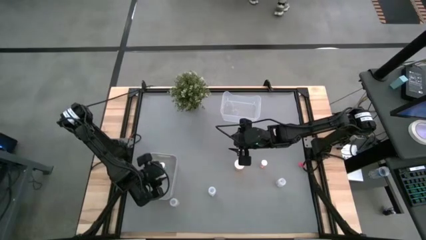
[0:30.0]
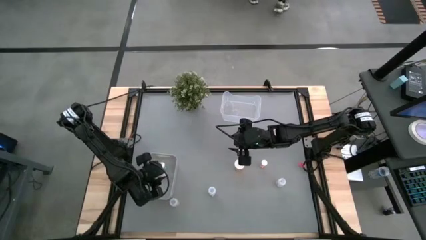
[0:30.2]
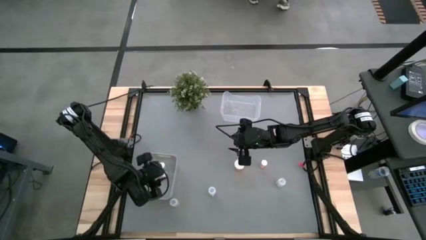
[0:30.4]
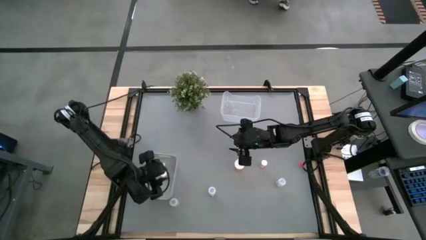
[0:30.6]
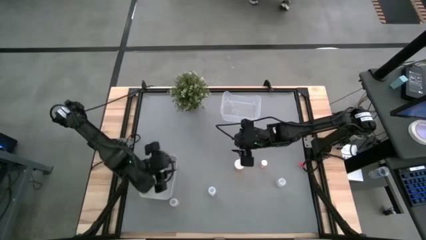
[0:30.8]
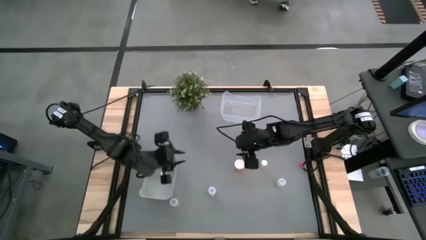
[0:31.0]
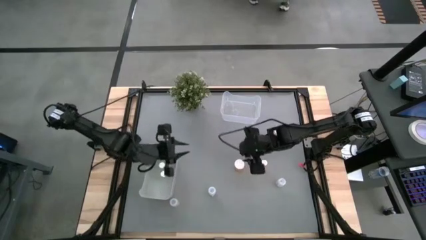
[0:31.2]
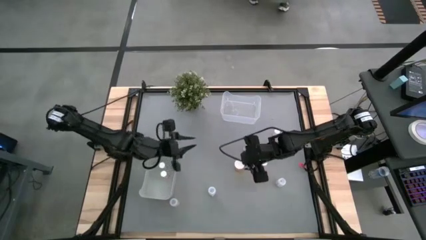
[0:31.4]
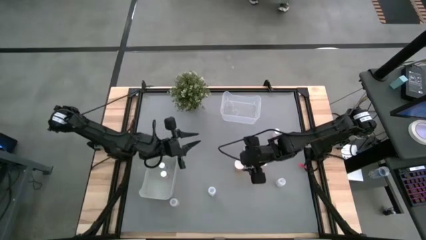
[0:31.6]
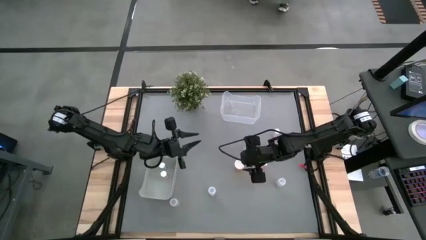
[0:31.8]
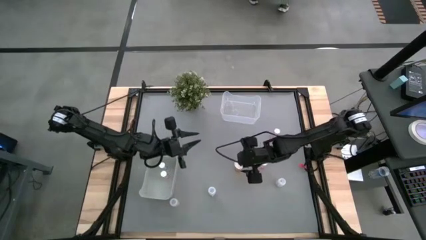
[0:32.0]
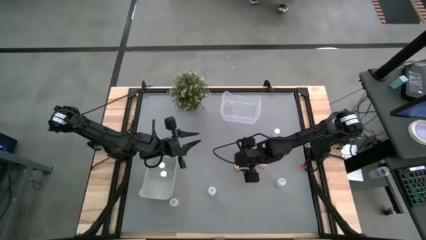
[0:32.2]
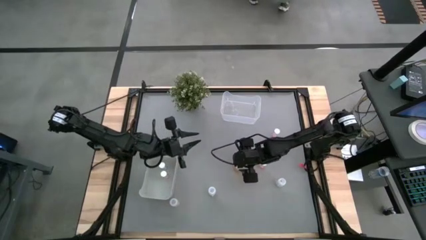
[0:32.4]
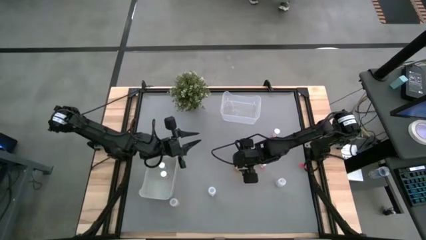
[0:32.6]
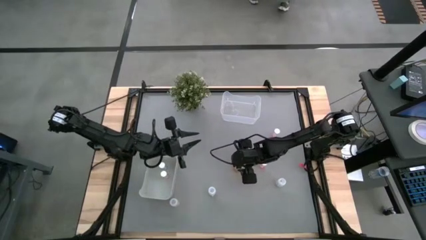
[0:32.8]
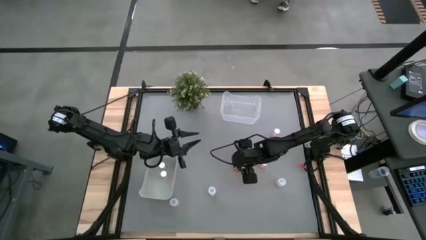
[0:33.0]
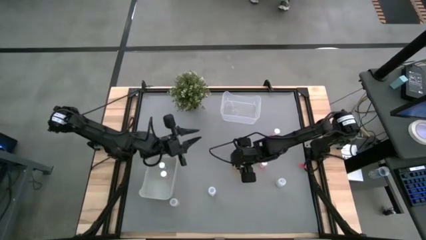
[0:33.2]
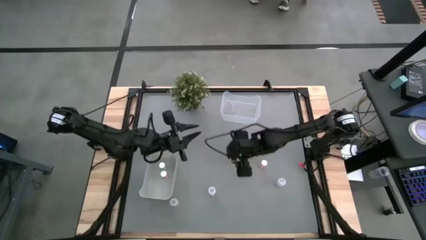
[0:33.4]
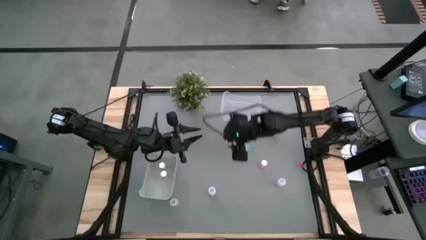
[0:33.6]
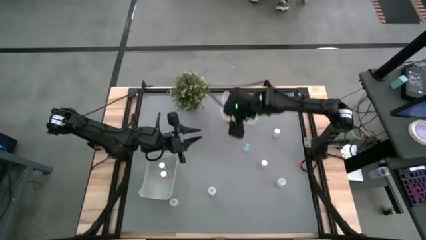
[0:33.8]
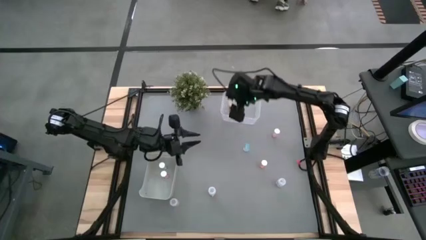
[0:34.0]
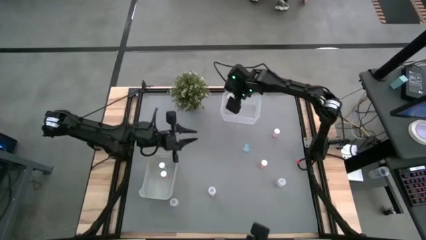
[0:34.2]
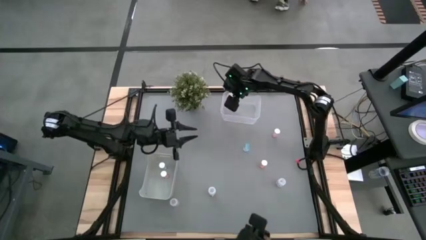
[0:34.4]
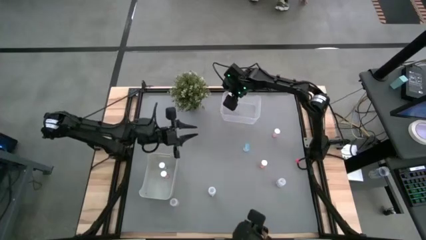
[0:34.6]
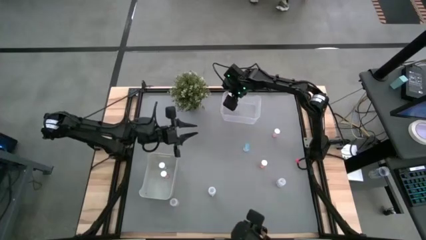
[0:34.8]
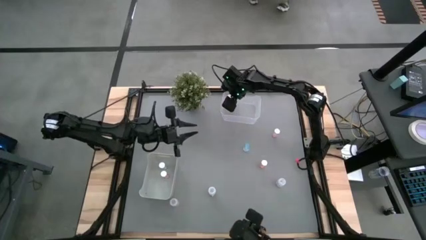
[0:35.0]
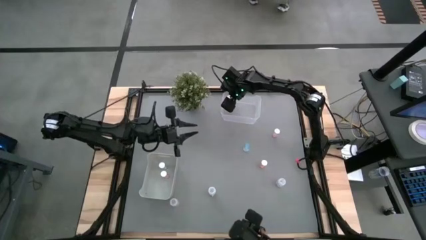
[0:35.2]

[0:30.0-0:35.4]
Task: Pick and place medicine bottles into bin by pill shape (circle, oval)
Put the orange capsule bottle into the transparent bin

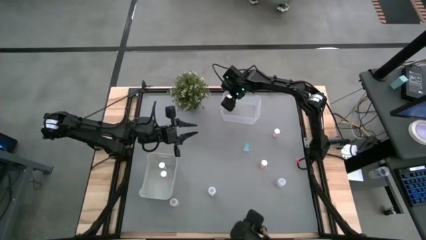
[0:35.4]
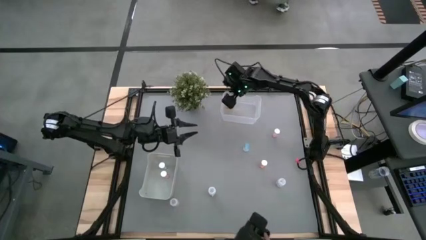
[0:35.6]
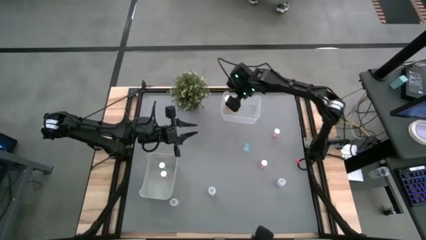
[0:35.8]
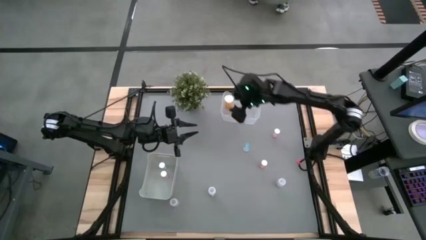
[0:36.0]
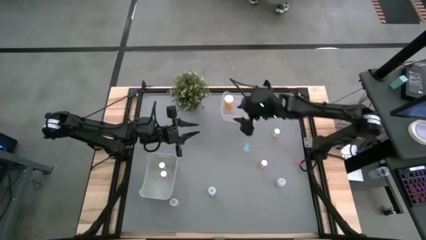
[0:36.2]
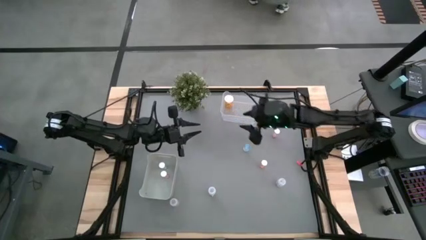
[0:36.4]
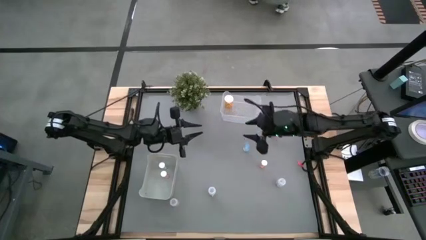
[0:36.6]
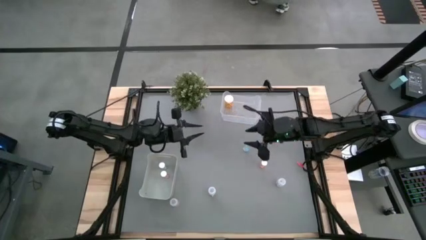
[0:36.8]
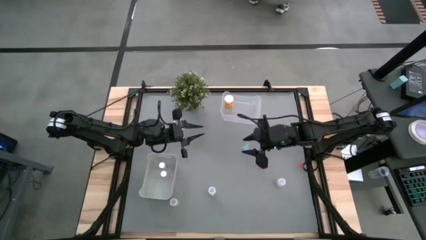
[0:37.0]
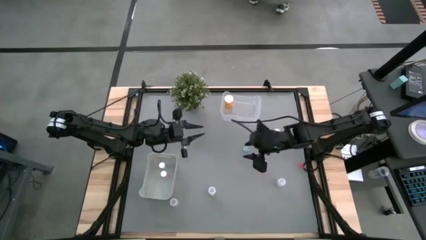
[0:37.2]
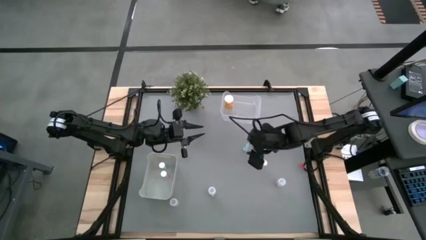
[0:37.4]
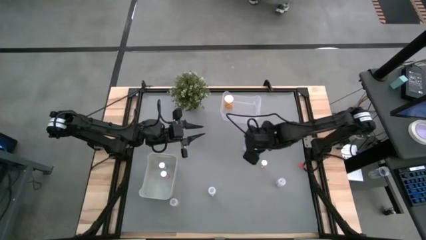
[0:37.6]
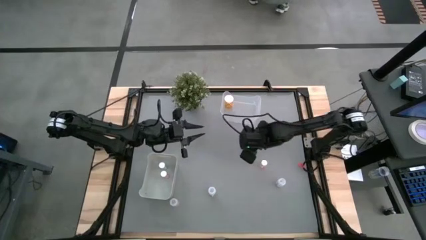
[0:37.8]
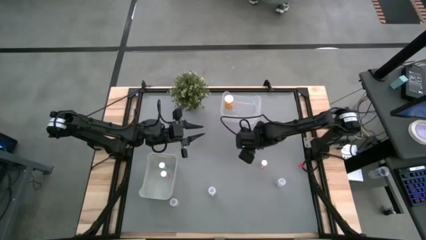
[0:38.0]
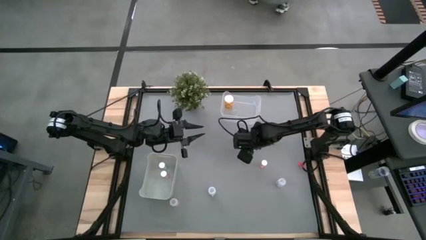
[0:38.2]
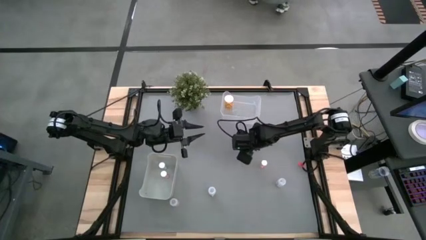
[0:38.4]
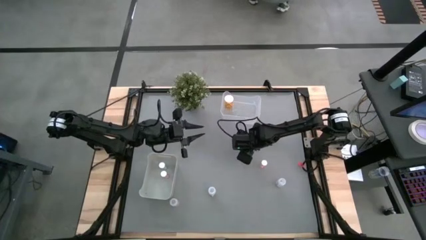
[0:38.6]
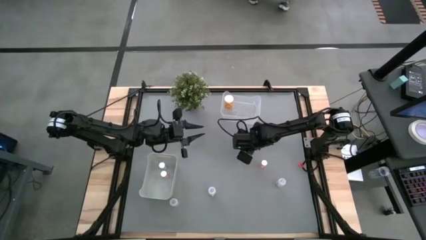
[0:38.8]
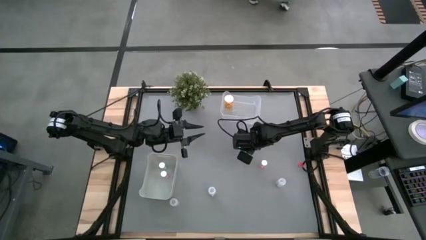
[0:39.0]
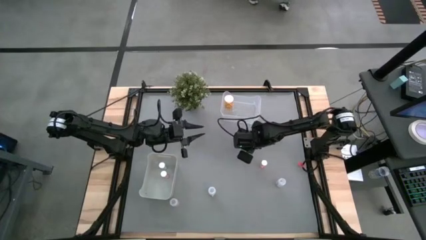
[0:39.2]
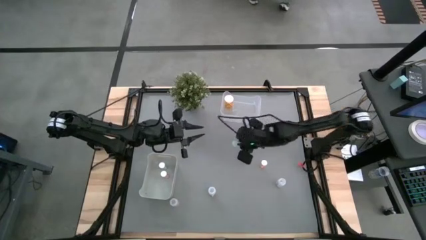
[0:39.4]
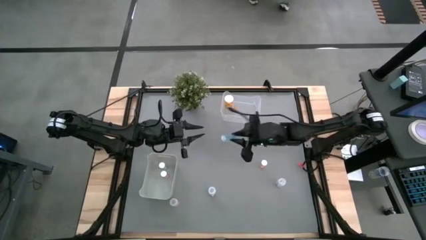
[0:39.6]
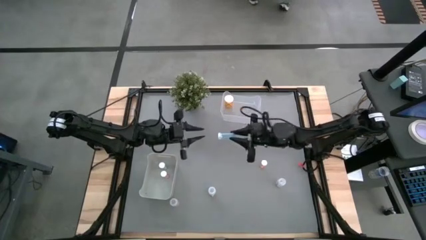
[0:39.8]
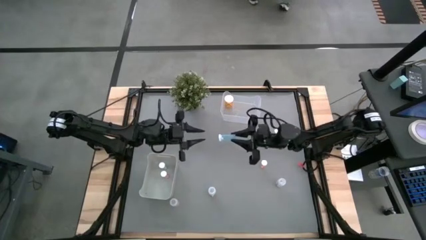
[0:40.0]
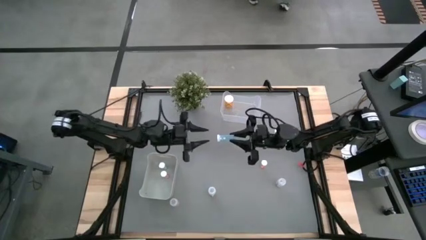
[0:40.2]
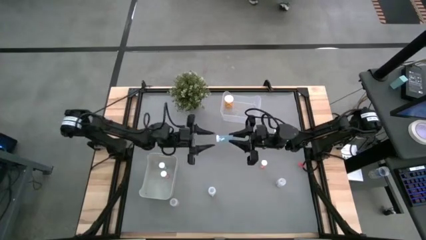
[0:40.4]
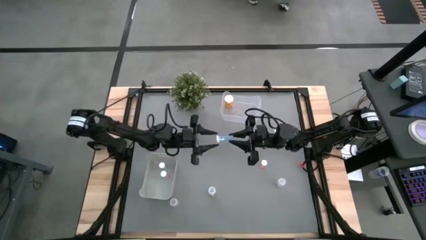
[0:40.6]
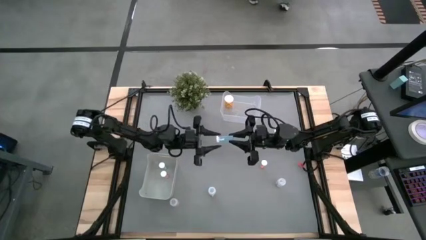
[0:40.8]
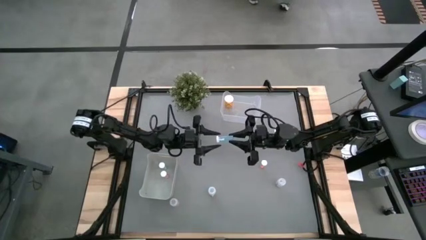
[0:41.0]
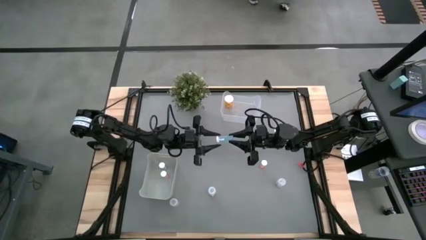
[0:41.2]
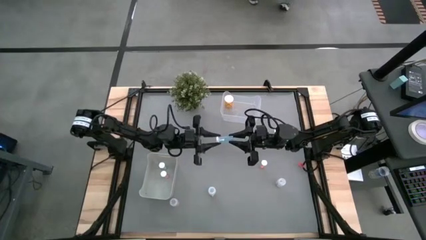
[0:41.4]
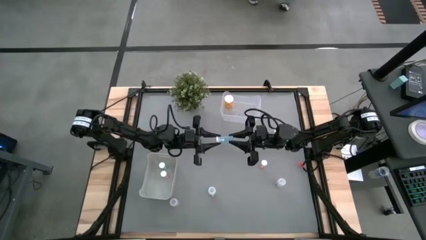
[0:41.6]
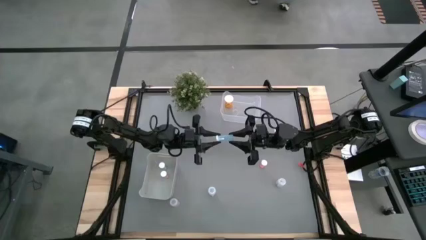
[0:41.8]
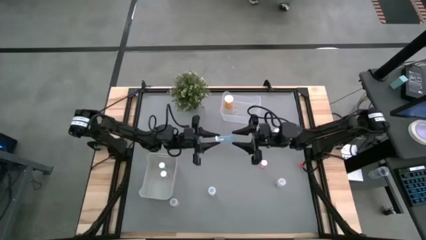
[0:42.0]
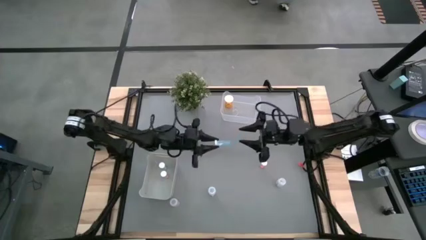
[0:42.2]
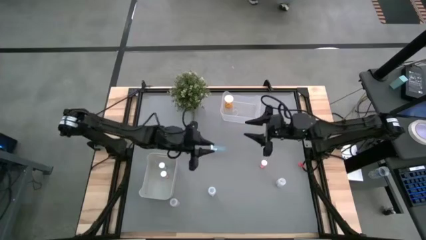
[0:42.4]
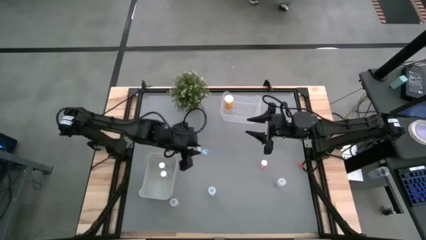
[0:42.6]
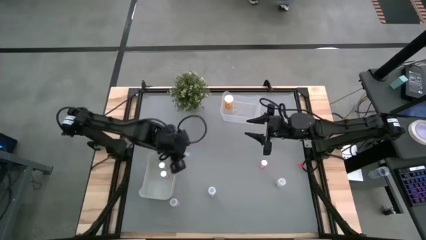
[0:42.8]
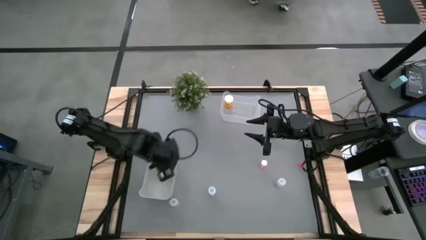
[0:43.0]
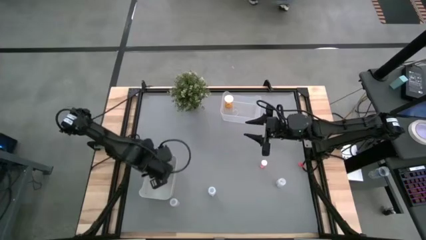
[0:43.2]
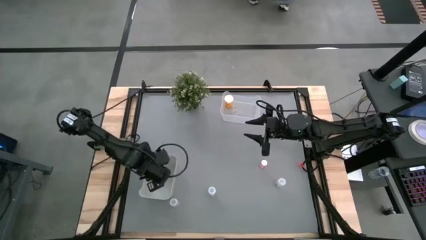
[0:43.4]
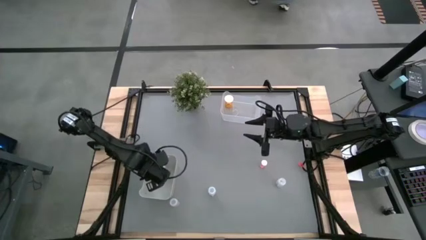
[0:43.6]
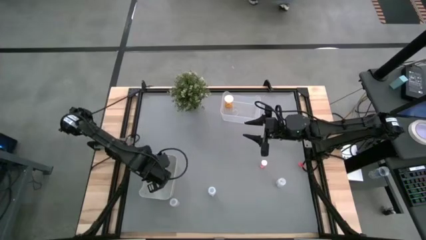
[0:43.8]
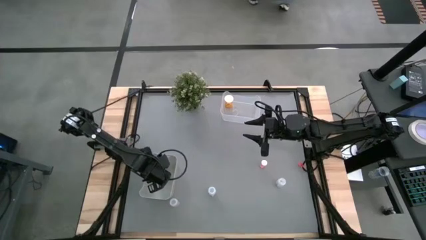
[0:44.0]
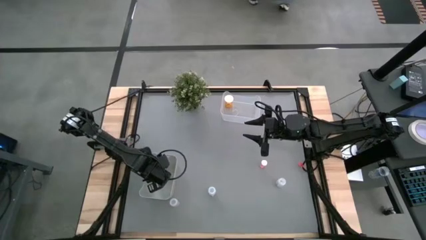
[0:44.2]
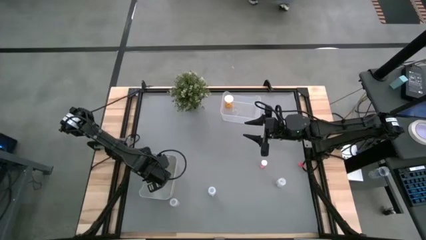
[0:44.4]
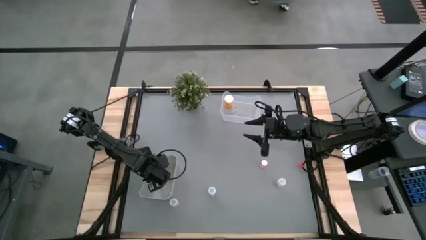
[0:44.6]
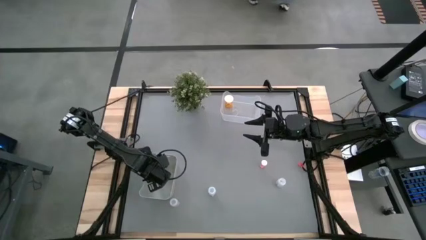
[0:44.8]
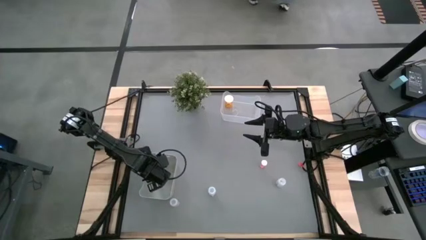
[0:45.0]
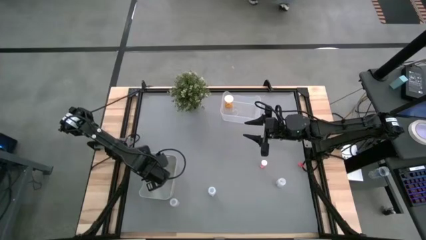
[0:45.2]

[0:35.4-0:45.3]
Put the blue tablet bottle into the gray bin

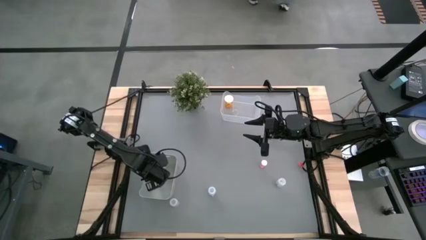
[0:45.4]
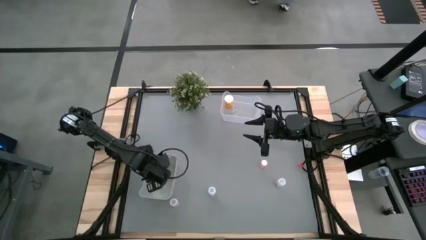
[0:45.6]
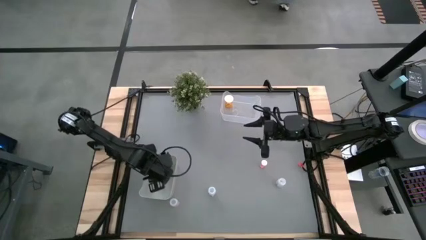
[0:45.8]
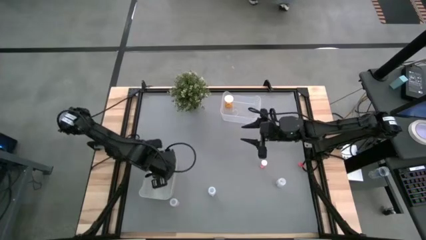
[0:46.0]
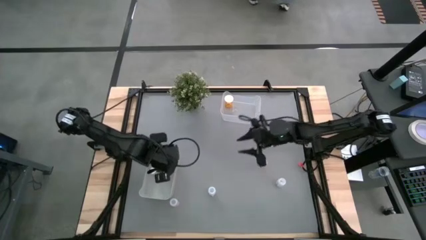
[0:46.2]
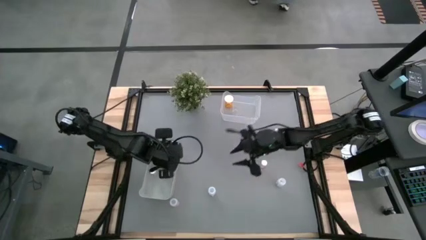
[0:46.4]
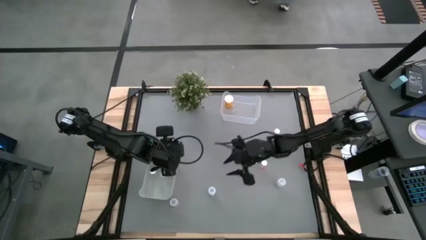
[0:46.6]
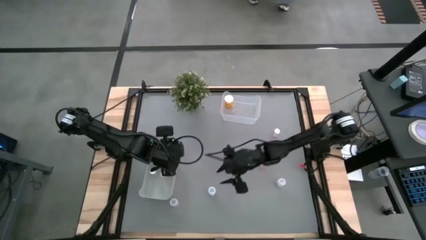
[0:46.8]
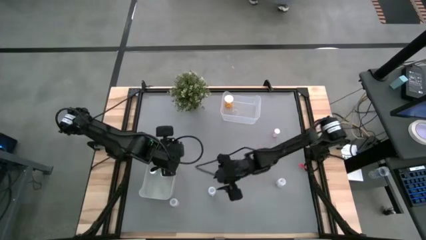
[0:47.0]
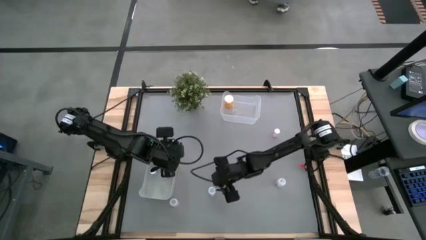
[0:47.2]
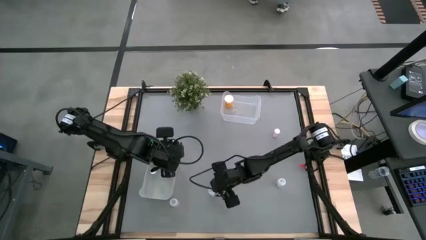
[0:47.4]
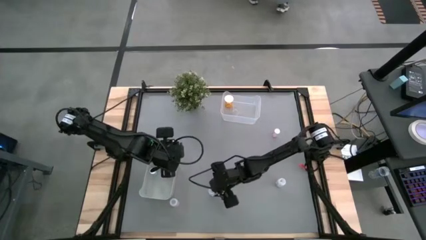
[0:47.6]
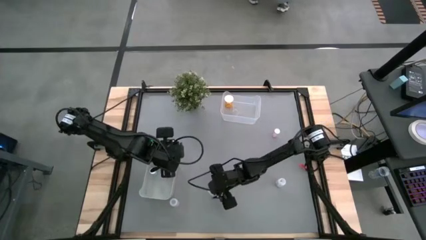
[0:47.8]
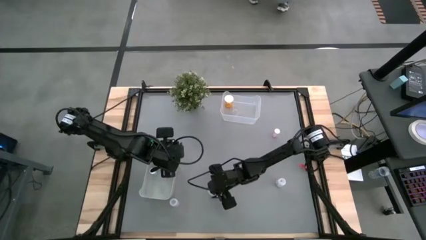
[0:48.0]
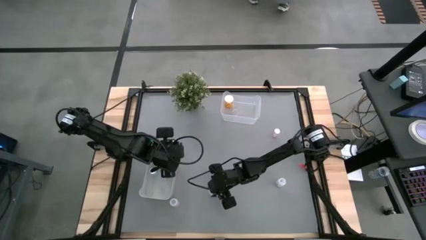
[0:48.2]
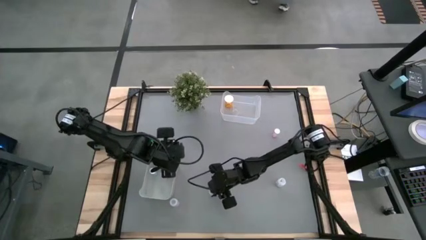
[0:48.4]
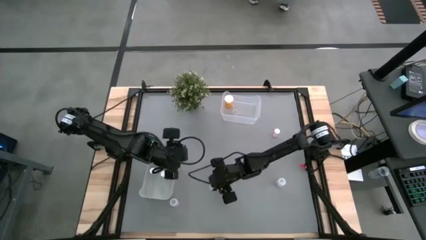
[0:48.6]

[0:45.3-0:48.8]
Put the middle white capsule bottle into the transparent bin
